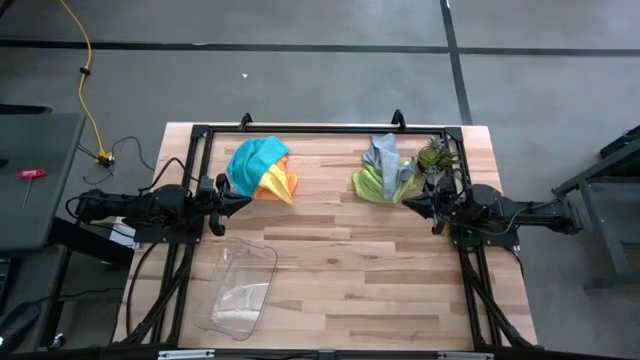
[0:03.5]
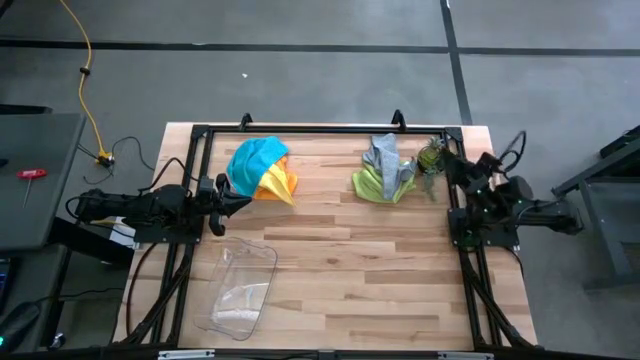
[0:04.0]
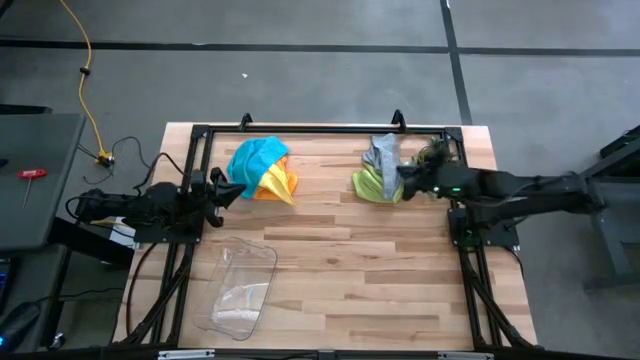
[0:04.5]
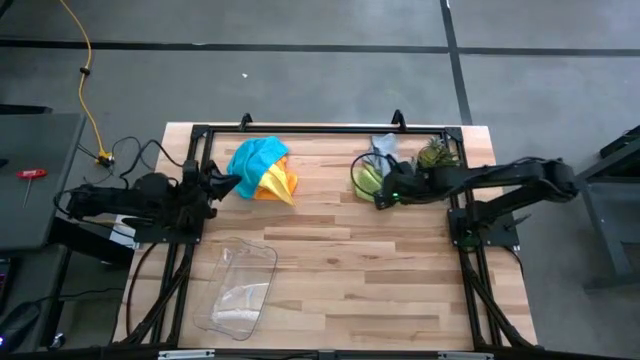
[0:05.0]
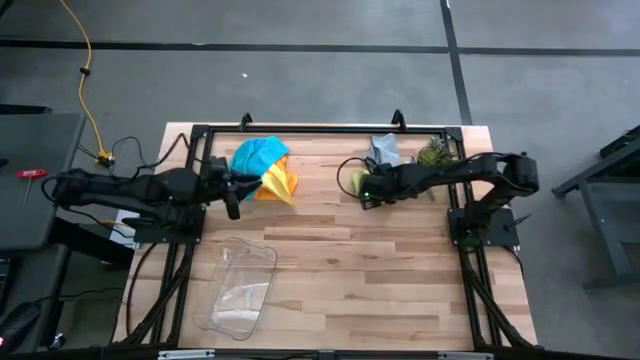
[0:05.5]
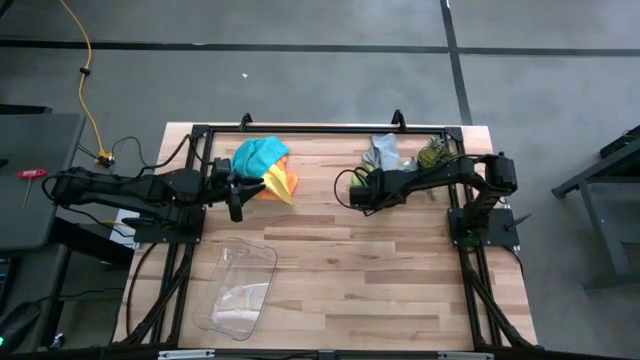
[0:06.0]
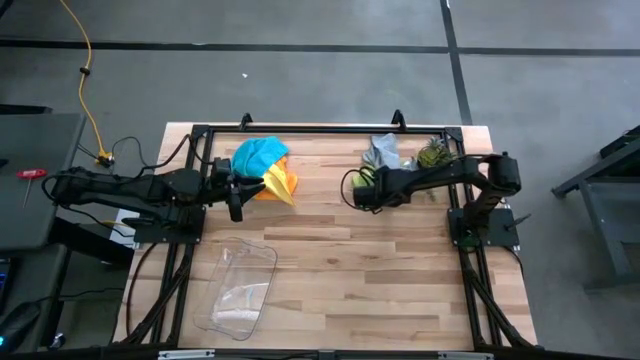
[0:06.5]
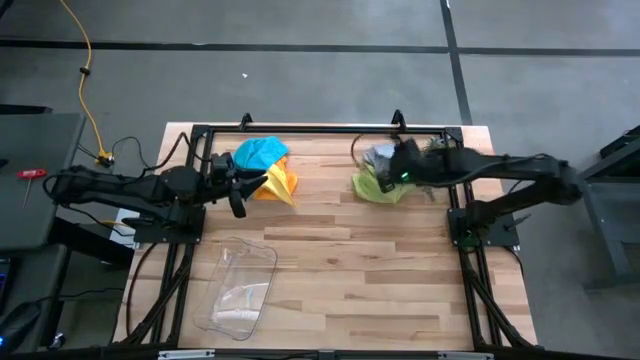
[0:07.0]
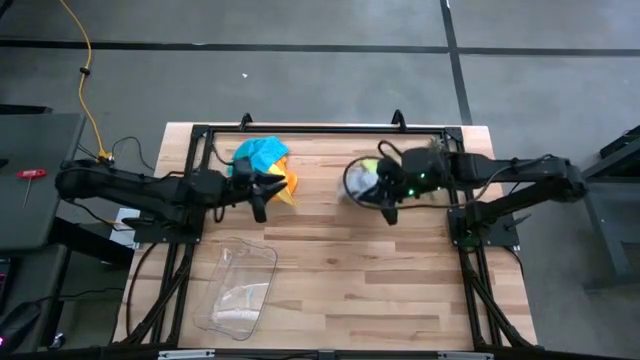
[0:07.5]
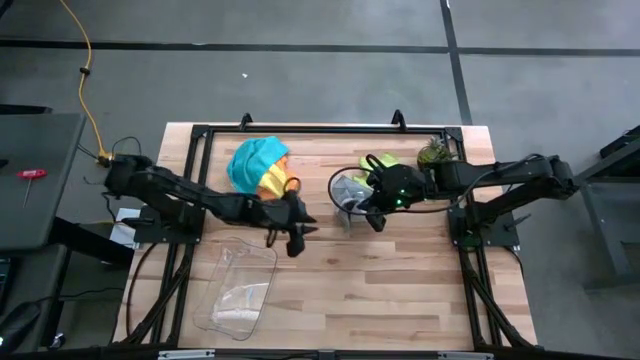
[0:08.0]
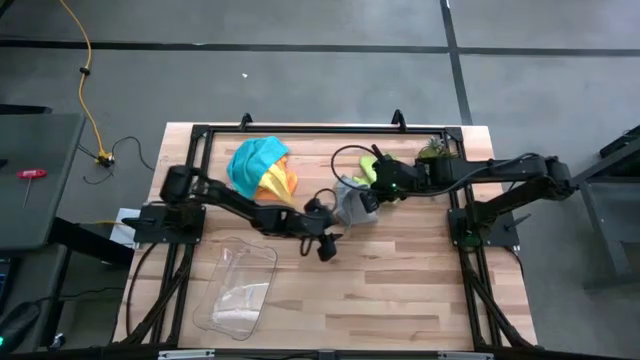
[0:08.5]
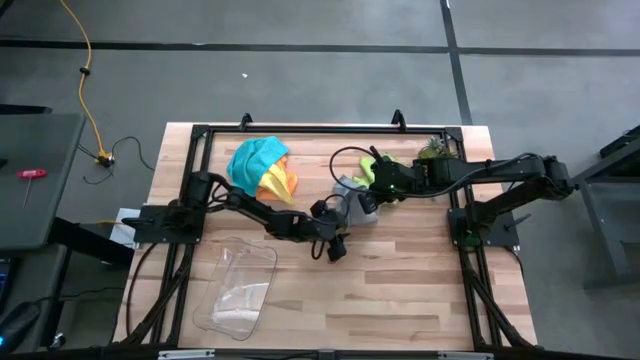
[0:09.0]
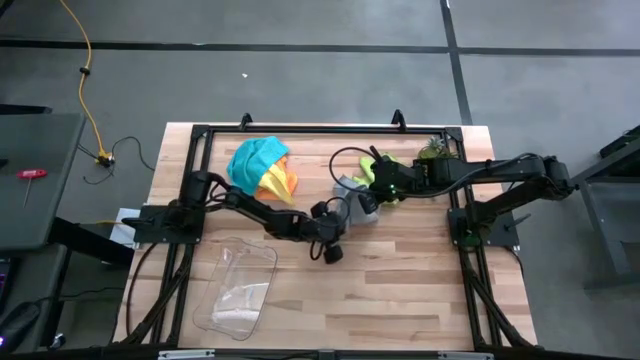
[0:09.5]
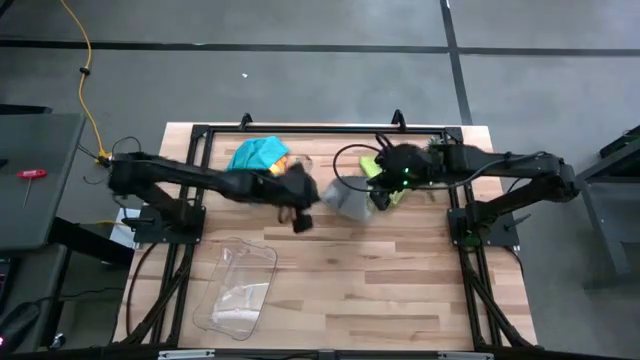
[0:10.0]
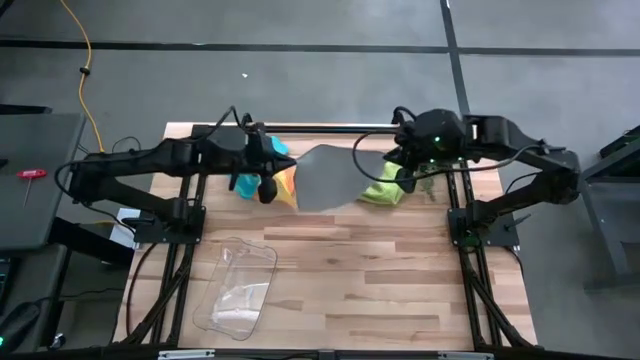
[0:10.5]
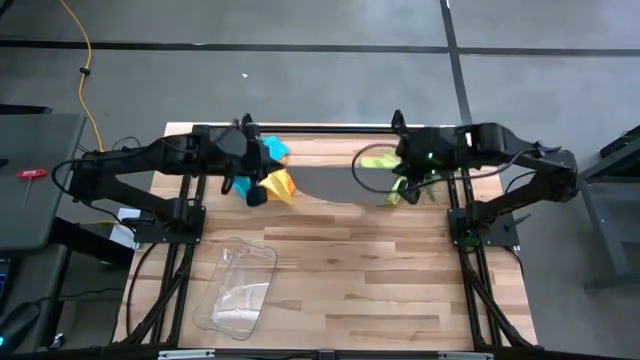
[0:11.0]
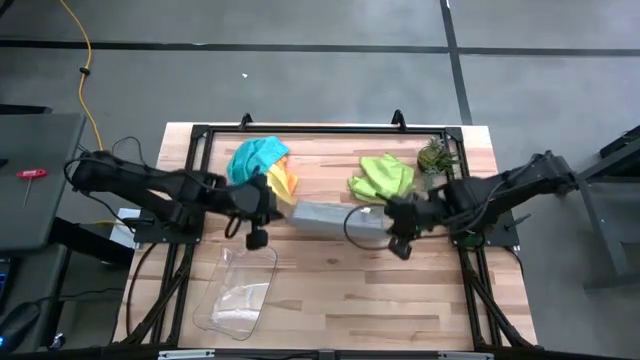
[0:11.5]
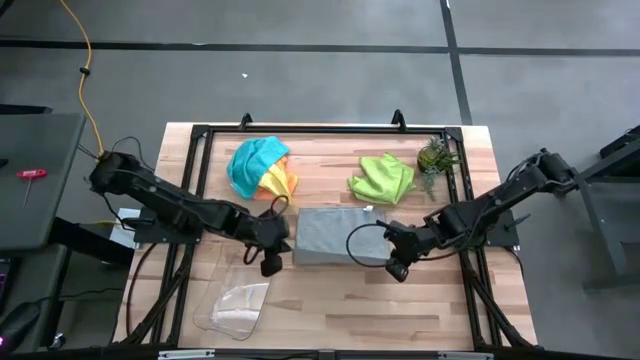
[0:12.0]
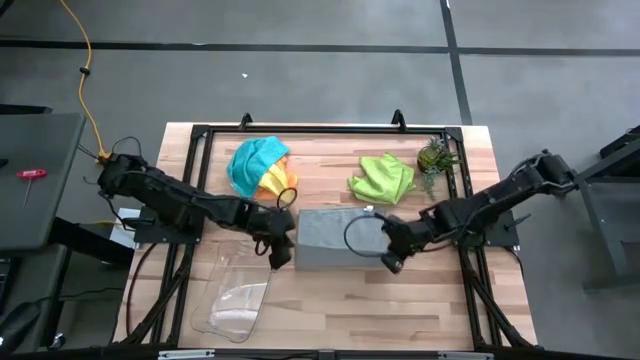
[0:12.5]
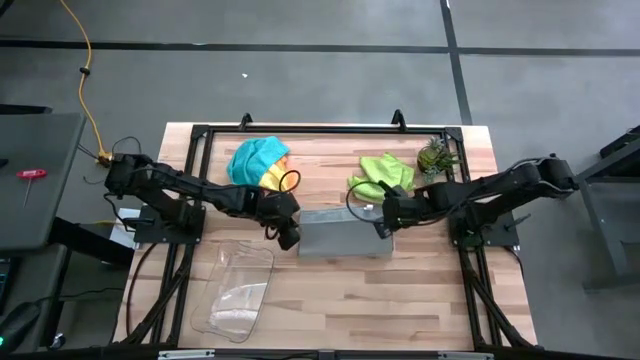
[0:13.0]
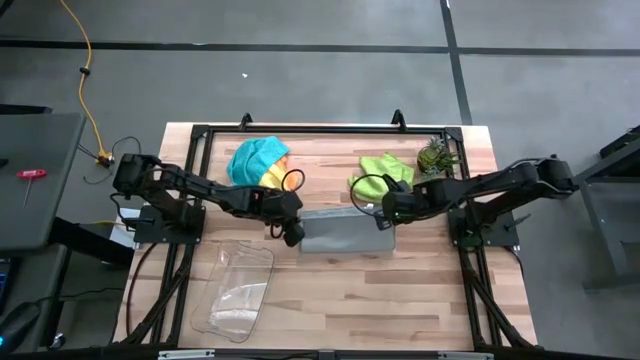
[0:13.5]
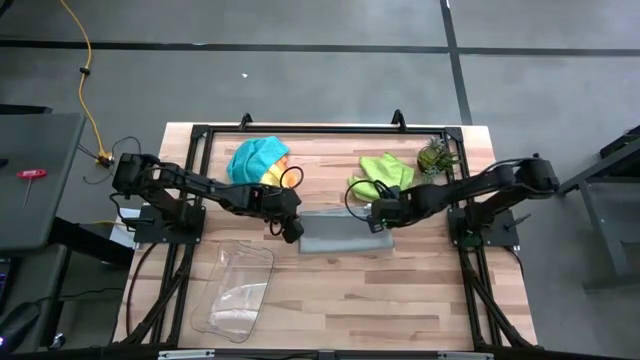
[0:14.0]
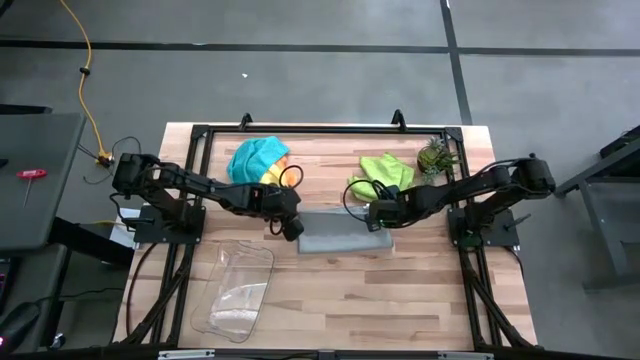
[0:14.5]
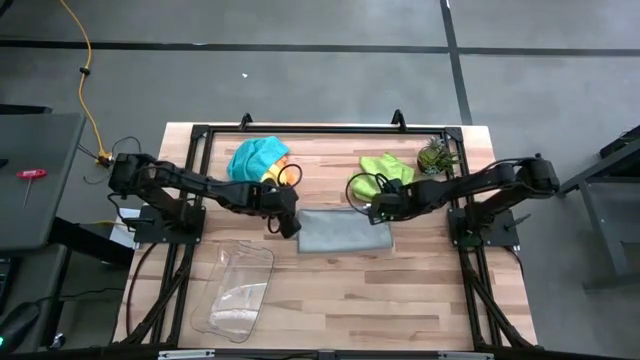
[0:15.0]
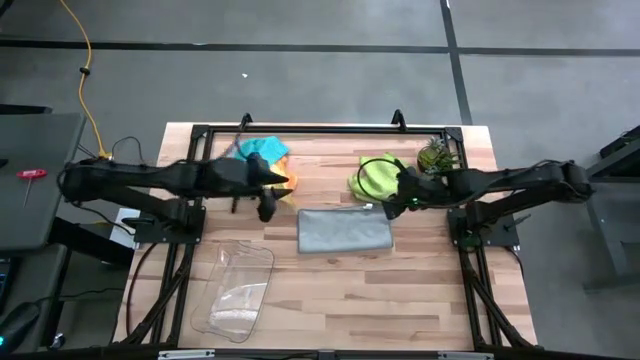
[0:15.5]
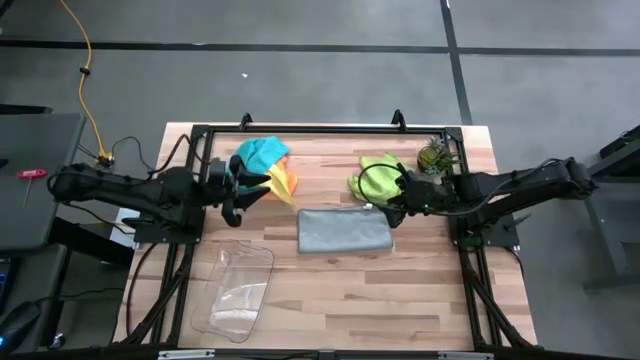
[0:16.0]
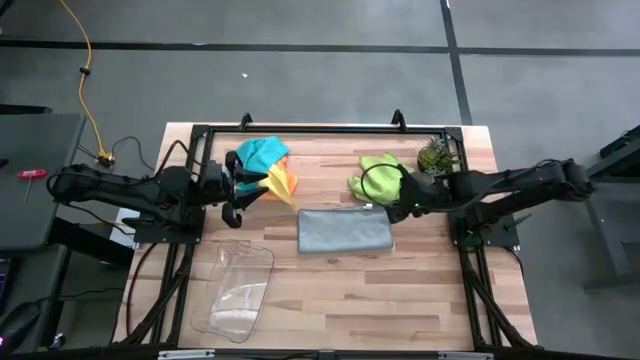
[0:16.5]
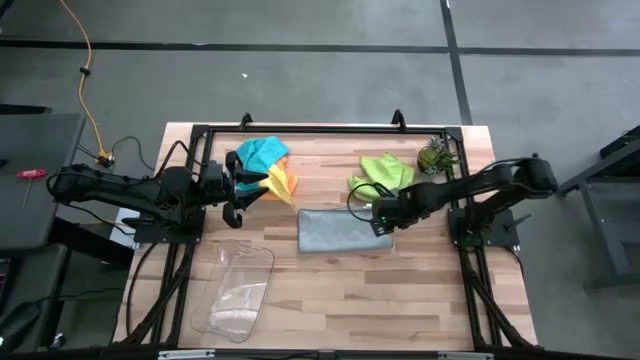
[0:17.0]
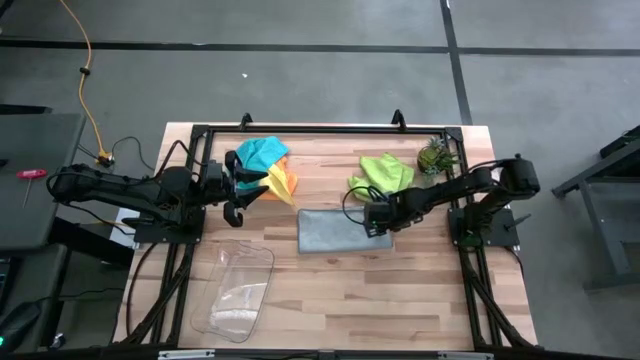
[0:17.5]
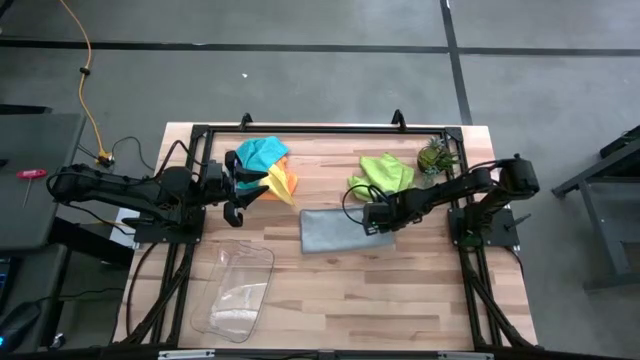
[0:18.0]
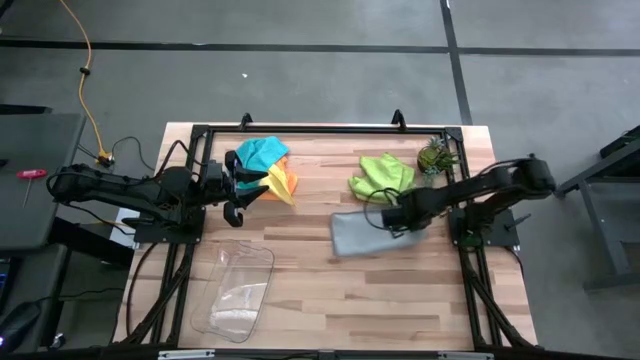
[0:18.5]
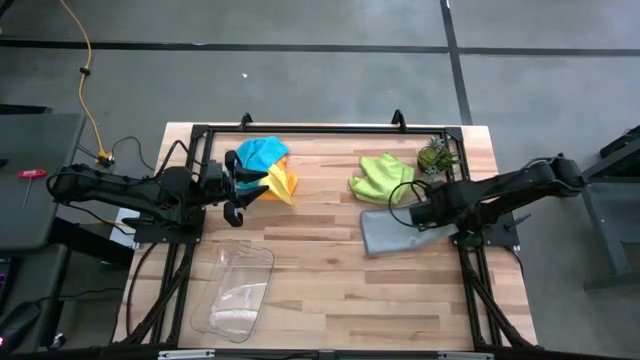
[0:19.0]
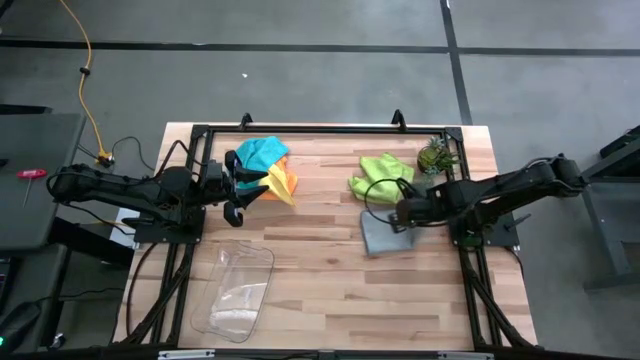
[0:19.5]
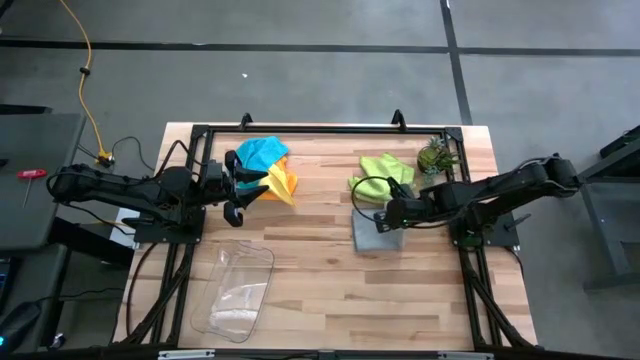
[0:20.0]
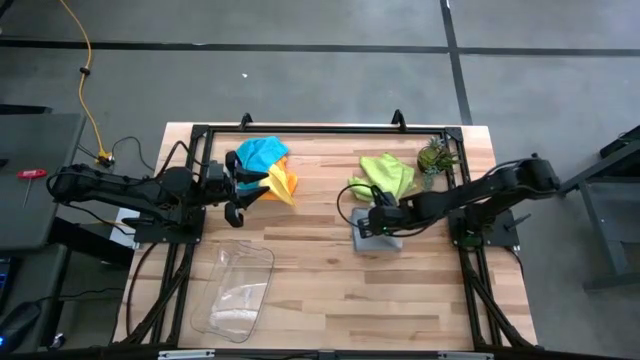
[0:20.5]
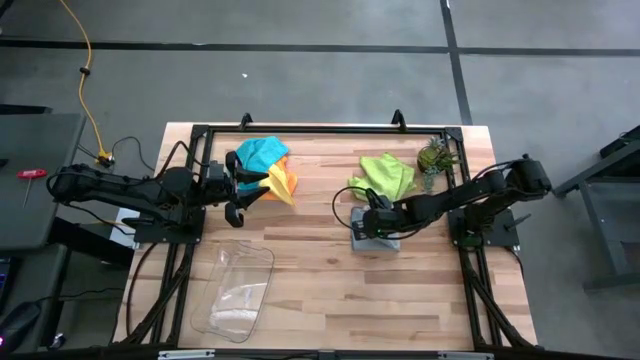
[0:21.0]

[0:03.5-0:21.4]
Task: Fold microfiber towels
Fold the gray microfiber cloth

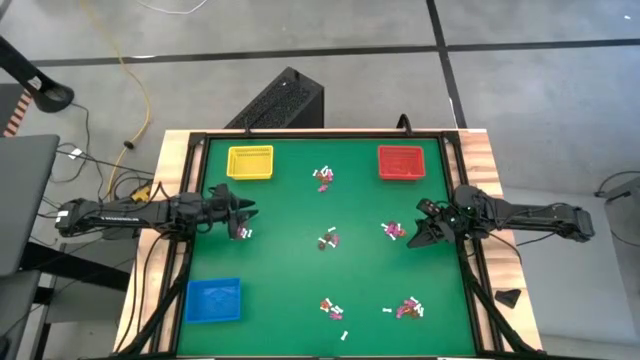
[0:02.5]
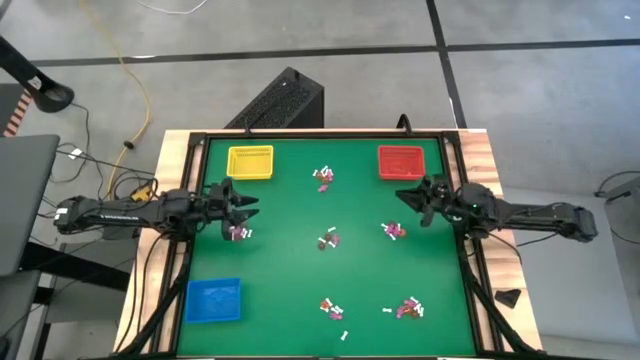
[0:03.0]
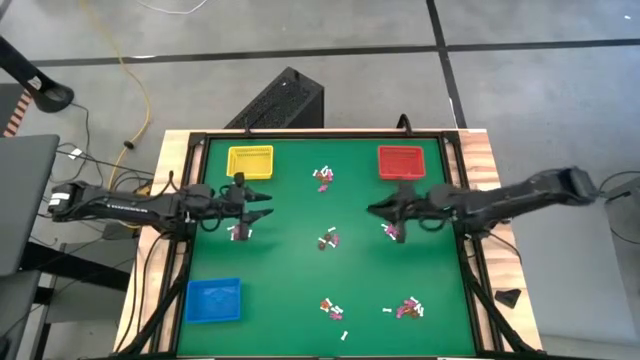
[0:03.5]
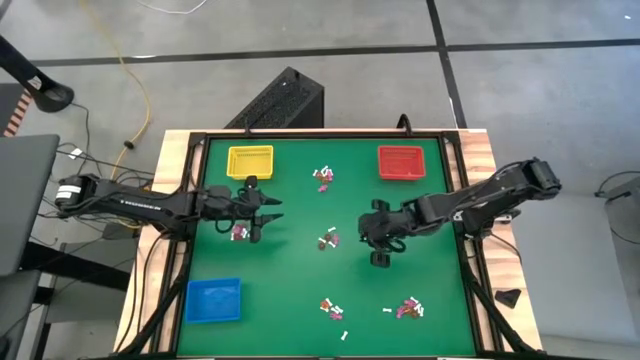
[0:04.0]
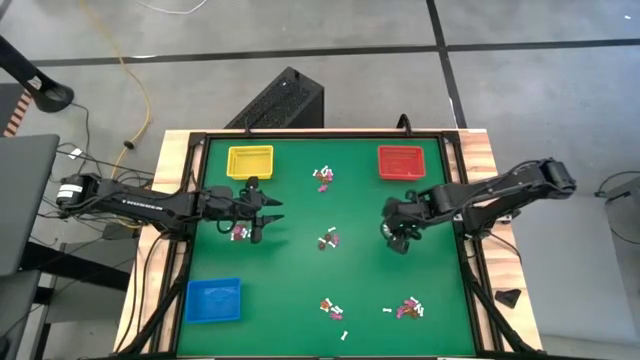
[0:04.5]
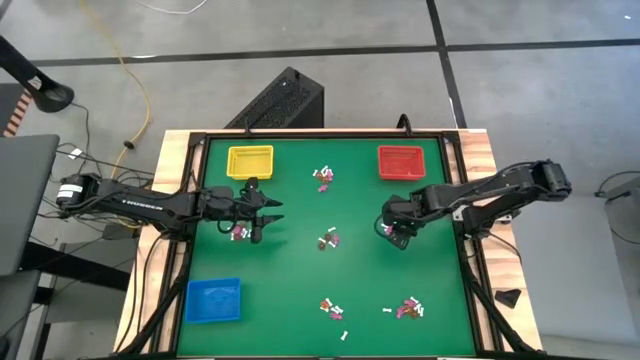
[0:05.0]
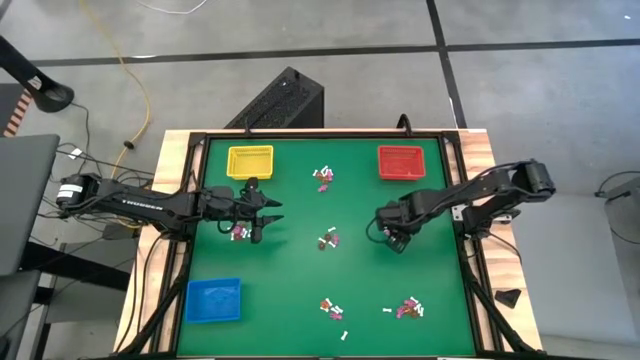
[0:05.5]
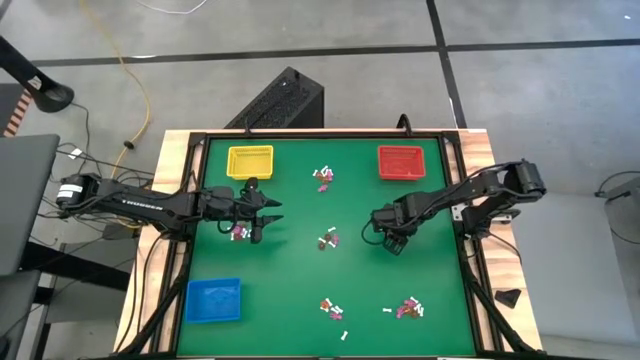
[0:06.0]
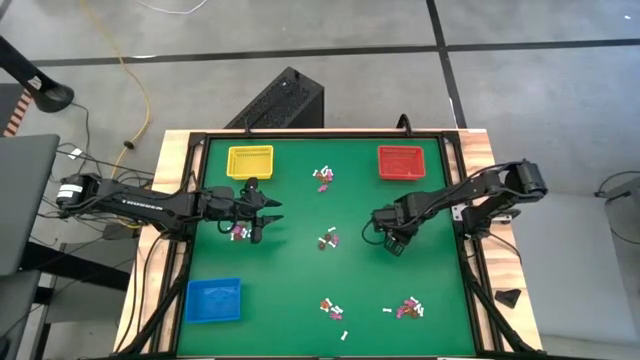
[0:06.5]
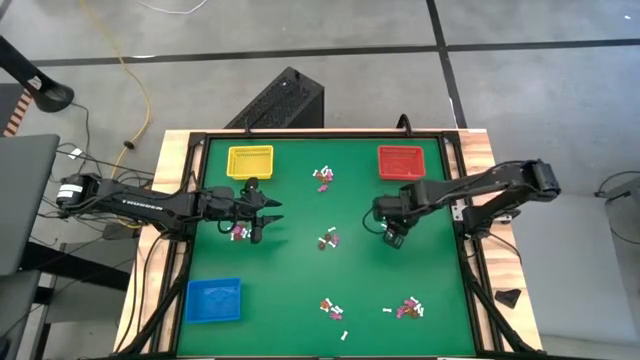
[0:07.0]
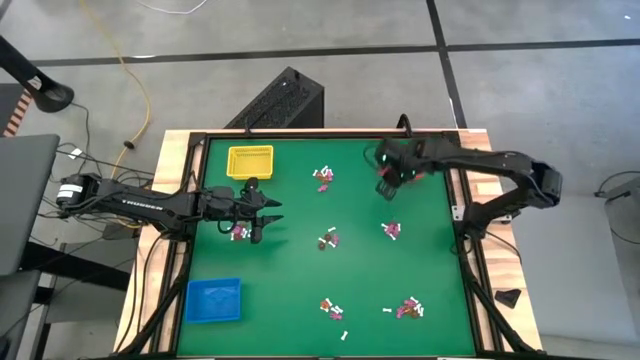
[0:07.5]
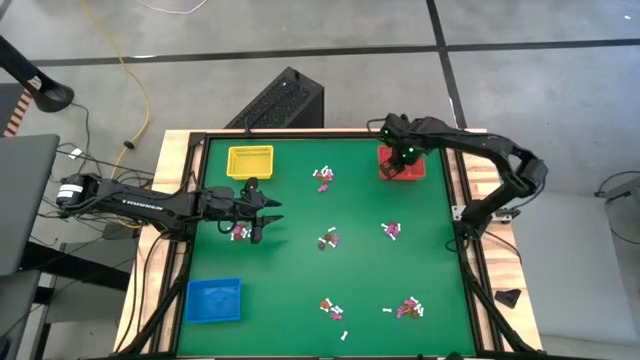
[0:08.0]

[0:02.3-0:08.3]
Task: Sort Halloween decoration
Put the pumpkin toy into the orange bin
